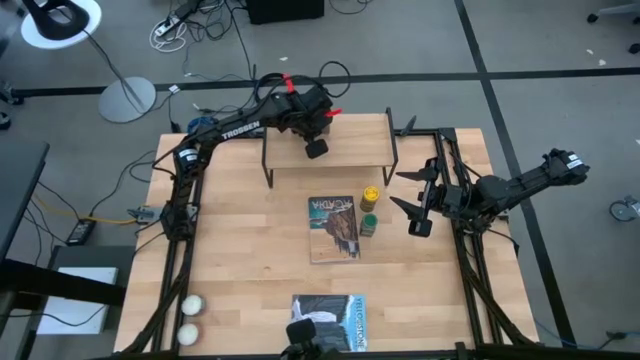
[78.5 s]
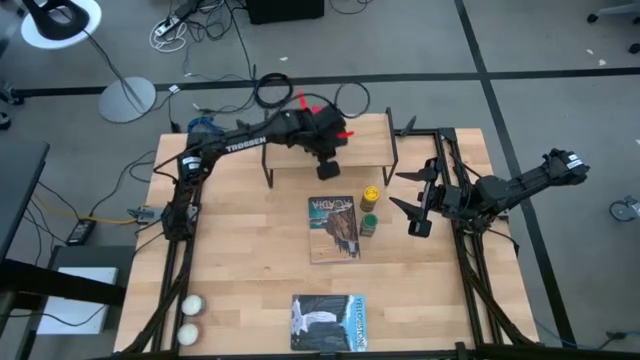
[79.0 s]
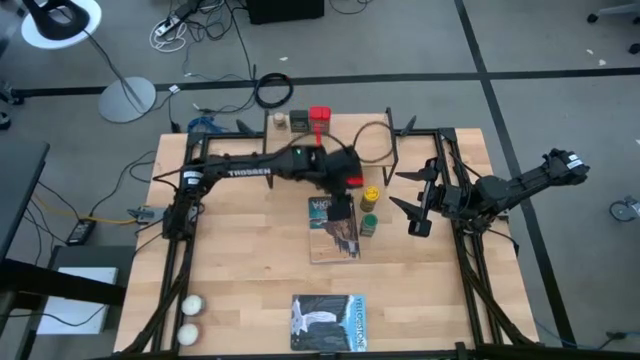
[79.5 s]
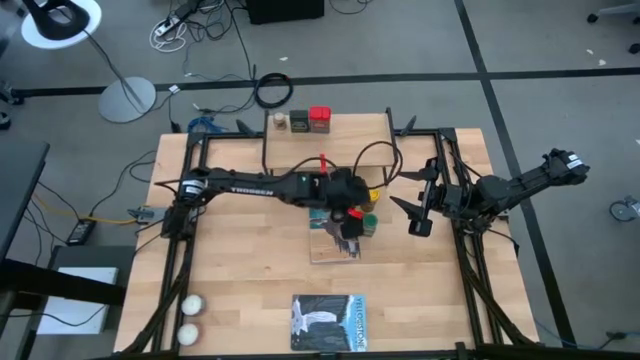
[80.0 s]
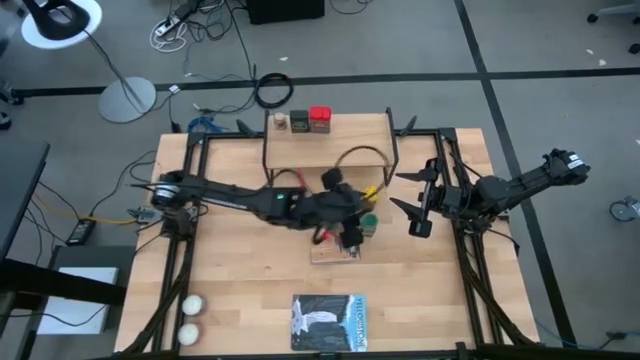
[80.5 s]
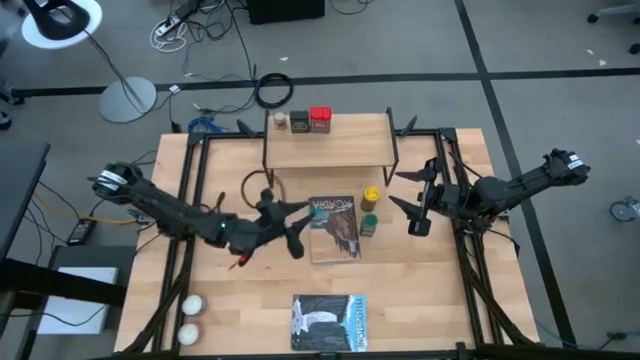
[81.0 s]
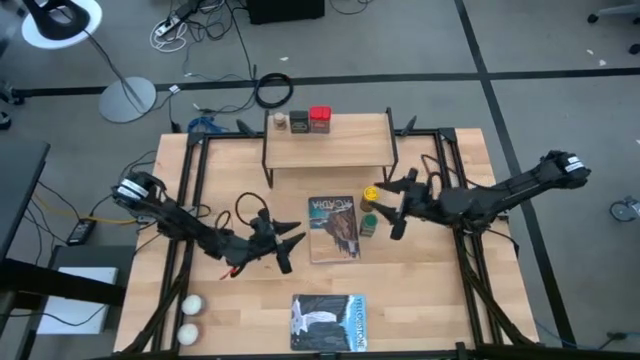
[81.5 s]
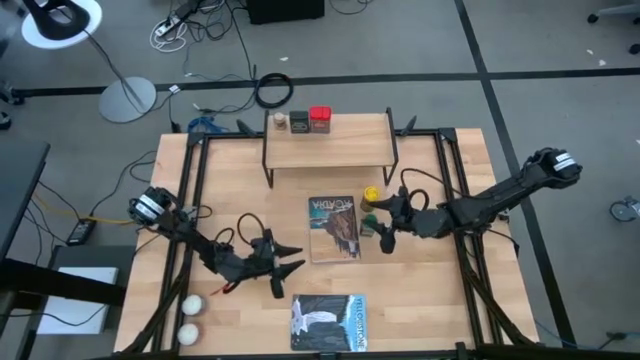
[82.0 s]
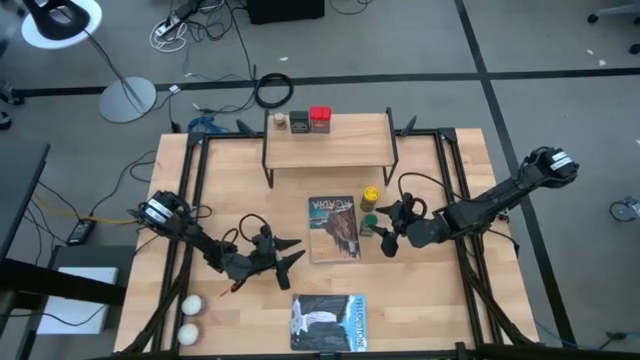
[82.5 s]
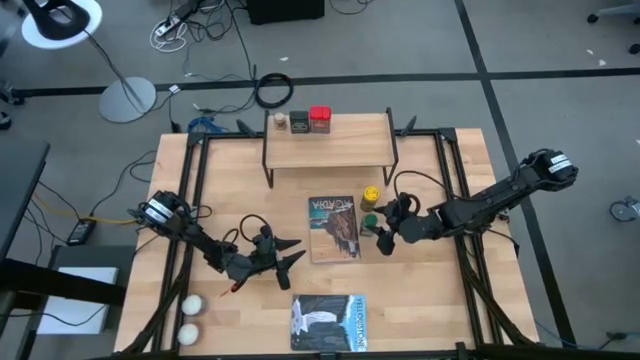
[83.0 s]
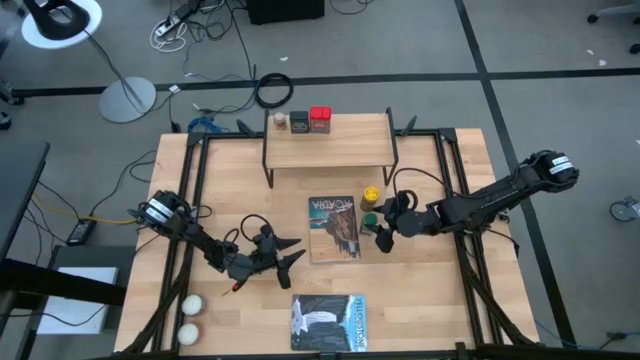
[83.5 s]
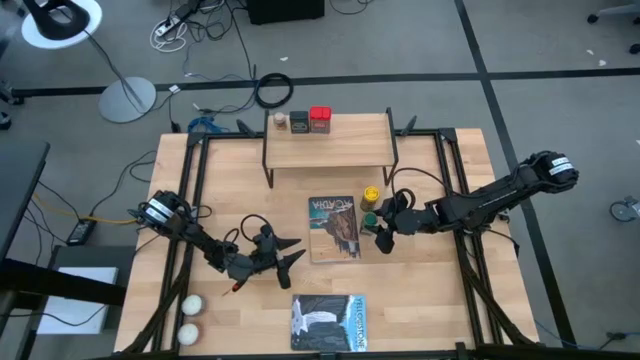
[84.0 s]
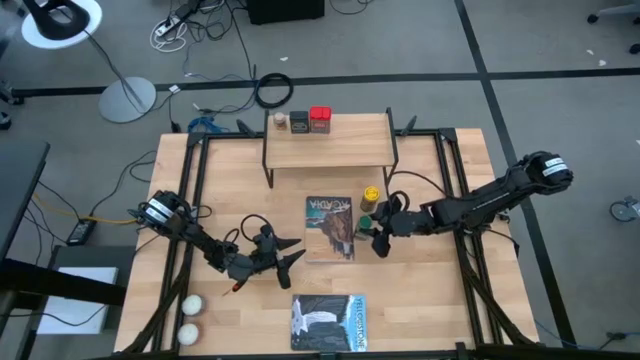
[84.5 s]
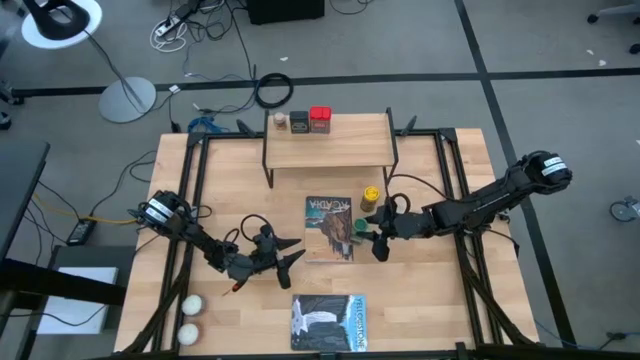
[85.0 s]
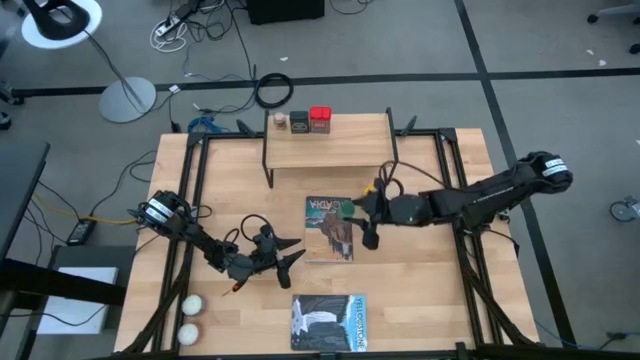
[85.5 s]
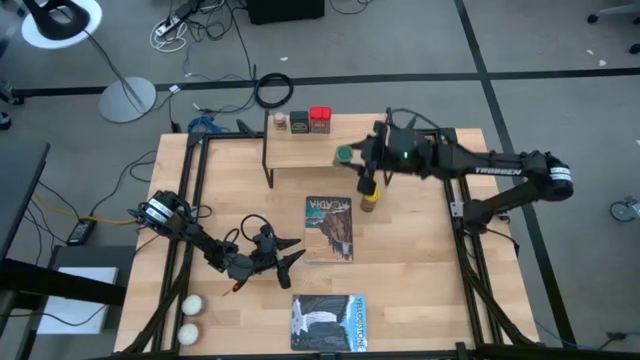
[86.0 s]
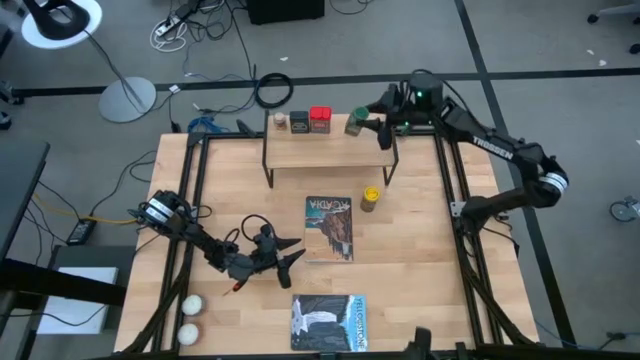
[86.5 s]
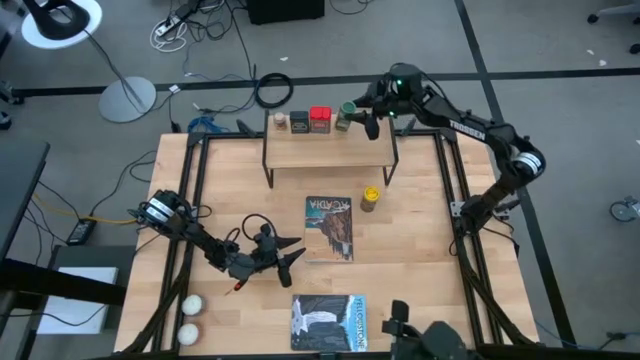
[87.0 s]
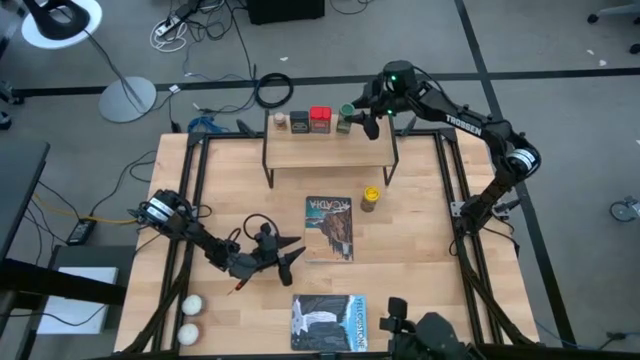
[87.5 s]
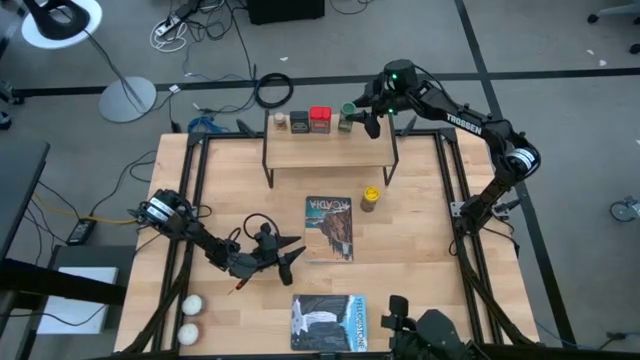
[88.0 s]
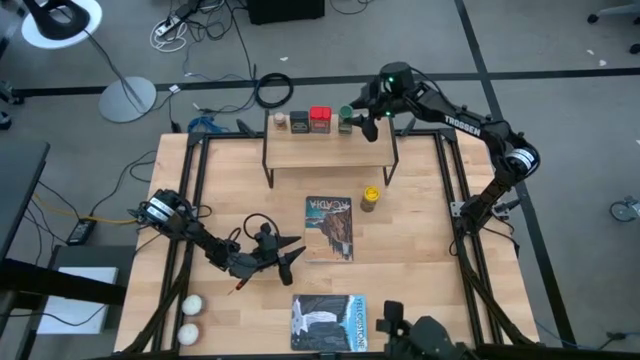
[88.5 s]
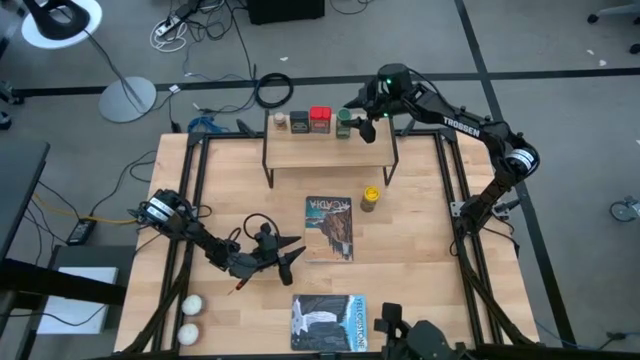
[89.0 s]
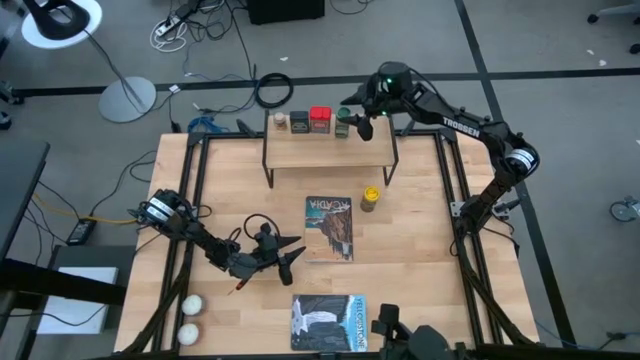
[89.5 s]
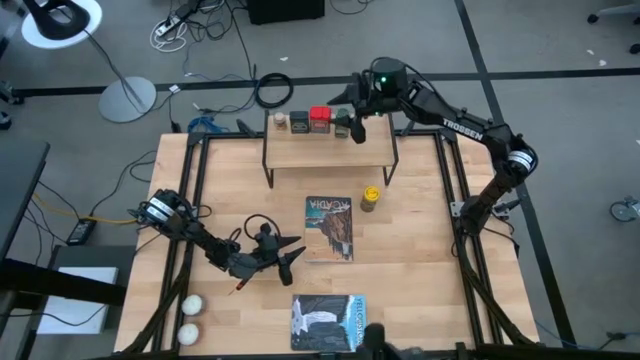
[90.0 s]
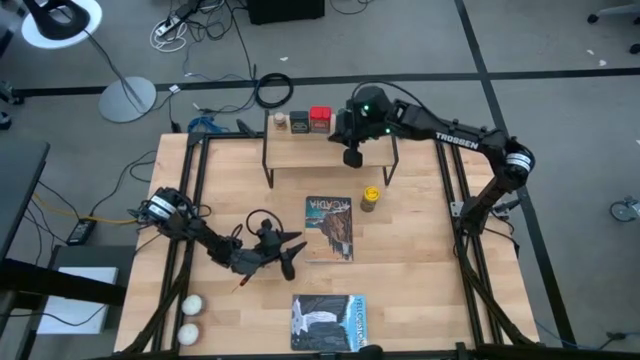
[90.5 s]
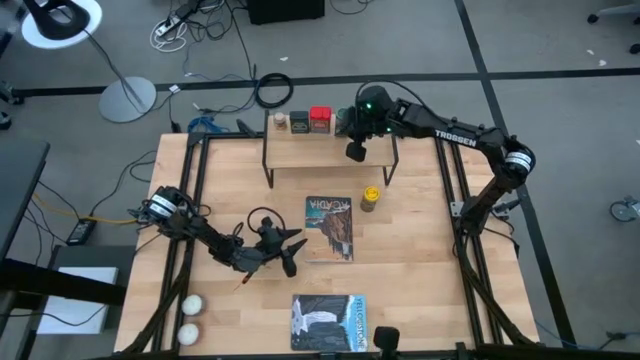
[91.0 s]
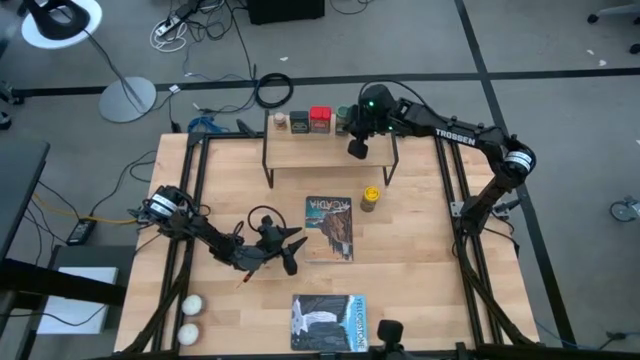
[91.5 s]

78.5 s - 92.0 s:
Task: Shelf spices
Put the green seasoning bottle on the shelf

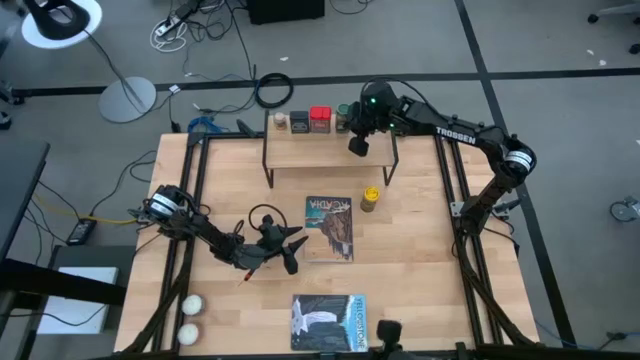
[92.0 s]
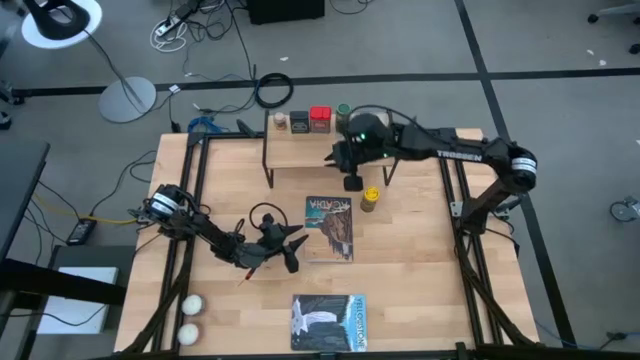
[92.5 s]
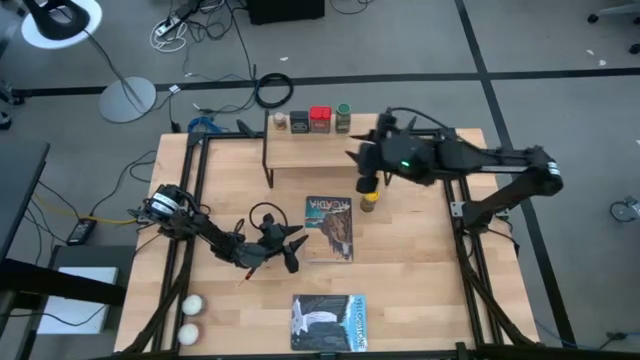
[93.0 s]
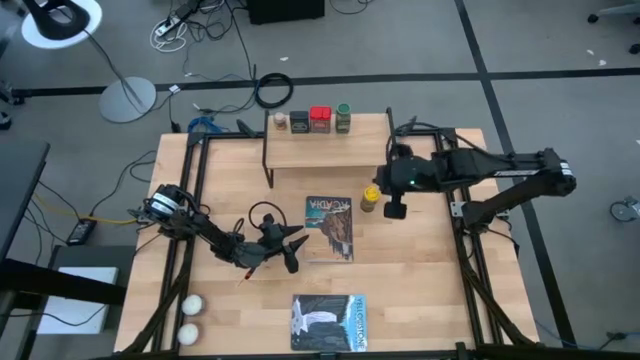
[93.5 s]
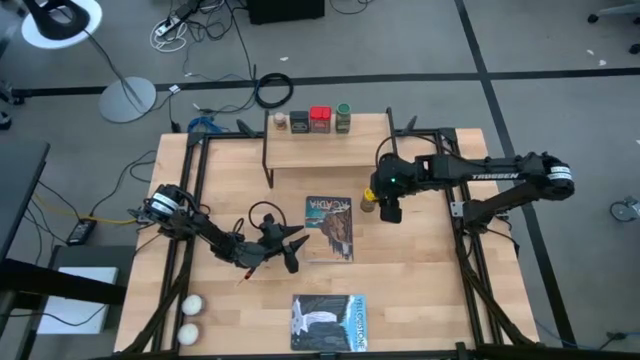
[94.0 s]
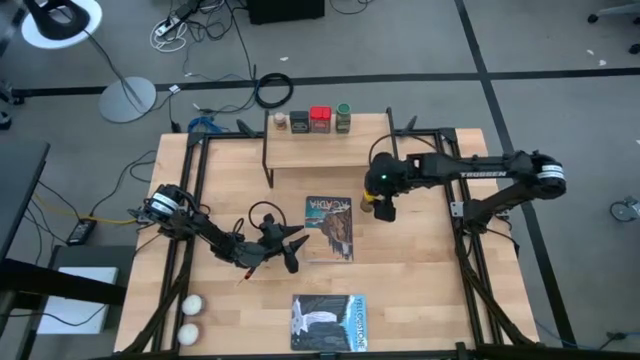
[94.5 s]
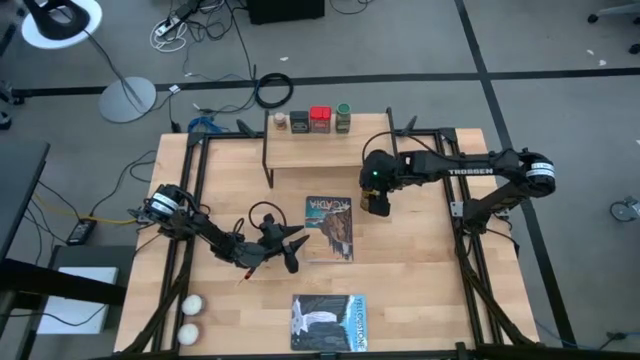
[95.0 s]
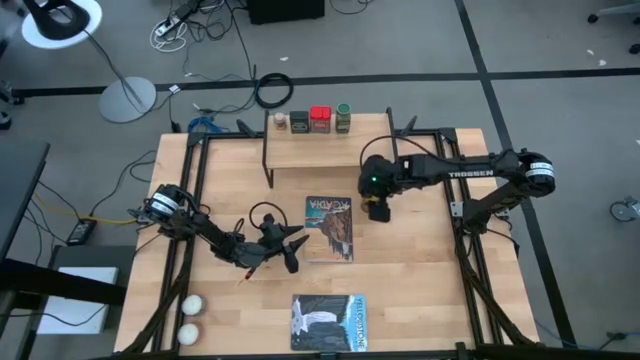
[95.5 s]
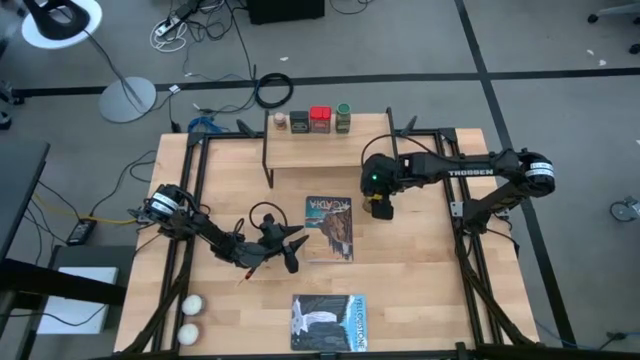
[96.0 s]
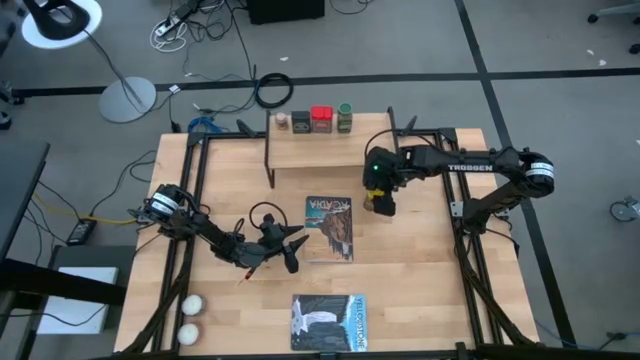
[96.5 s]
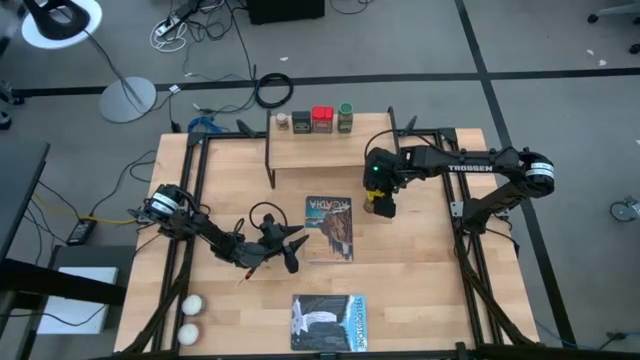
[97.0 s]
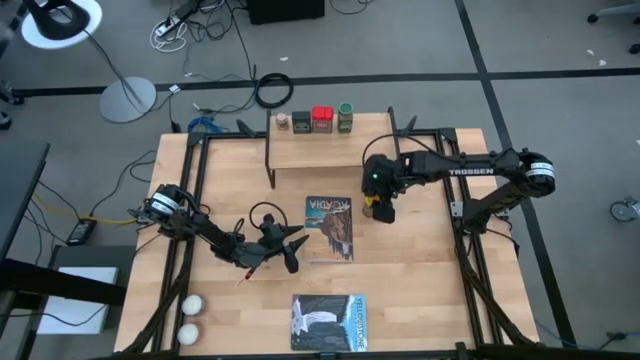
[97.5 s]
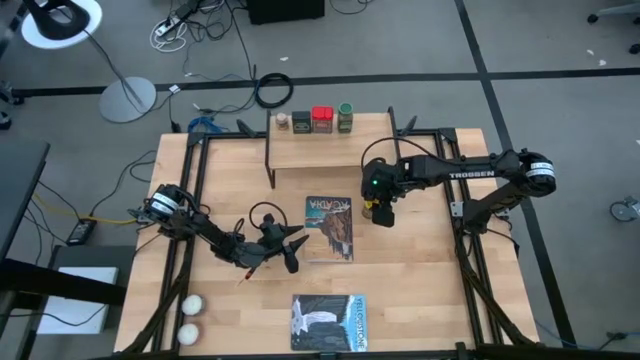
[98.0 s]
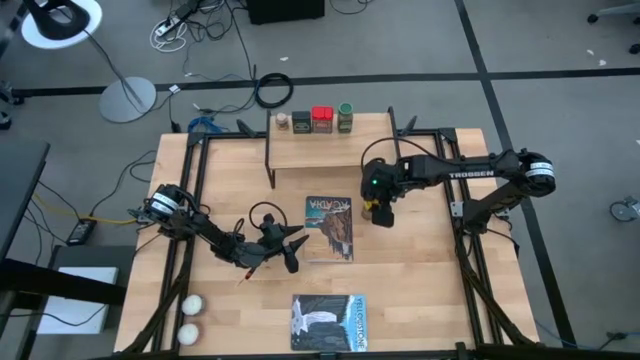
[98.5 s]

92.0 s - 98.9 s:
Put the yellow seasoning bottle on the shelf

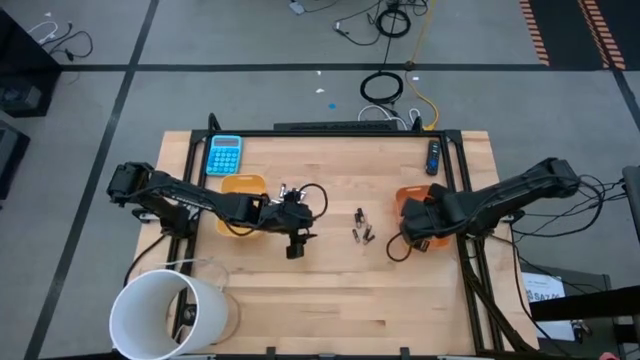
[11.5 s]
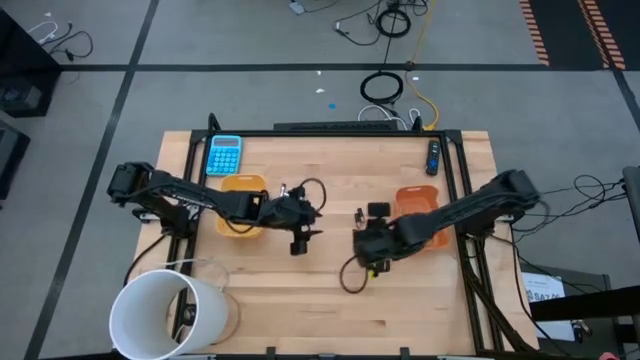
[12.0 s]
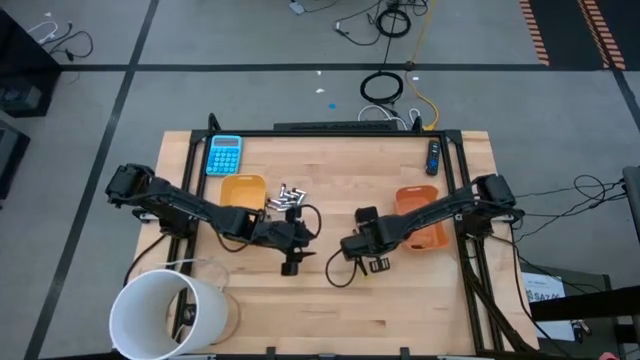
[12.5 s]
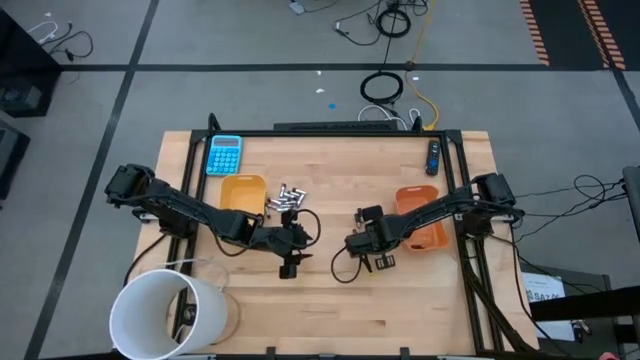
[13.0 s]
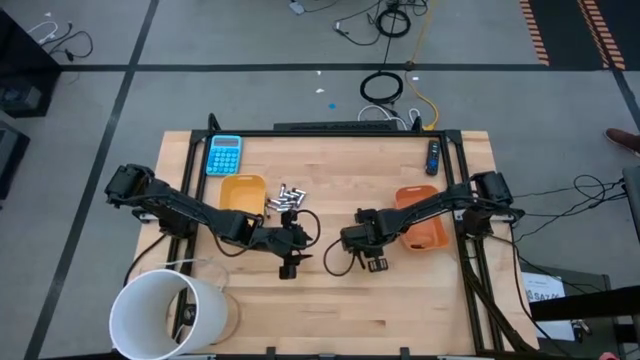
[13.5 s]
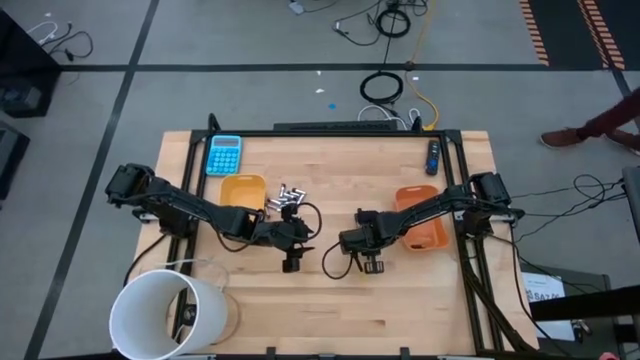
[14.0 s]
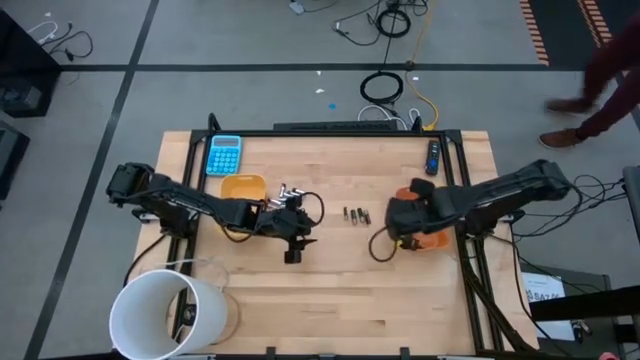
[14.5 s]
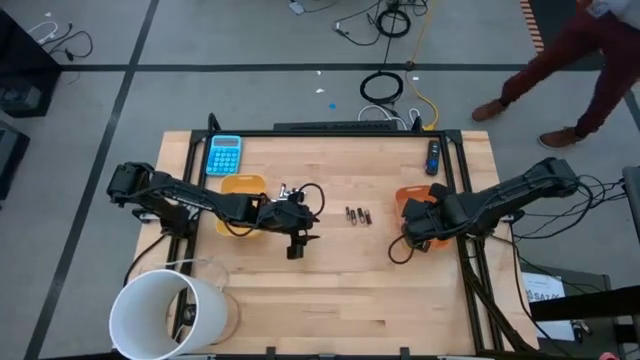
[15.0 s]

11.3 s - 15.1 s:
Task: Sort batteries
Put the black battery into the orange bin
